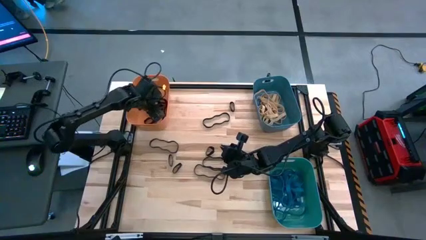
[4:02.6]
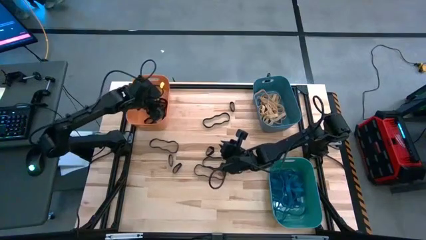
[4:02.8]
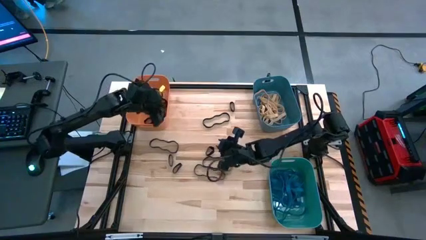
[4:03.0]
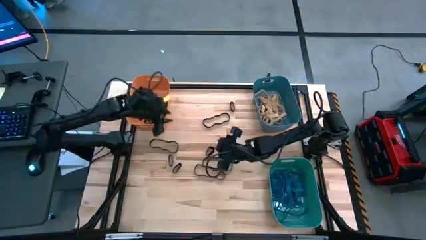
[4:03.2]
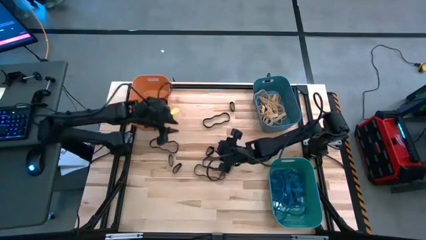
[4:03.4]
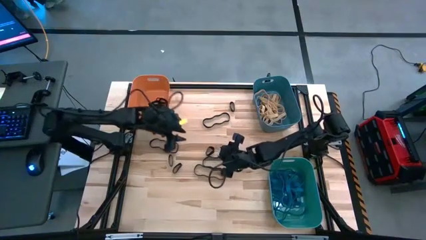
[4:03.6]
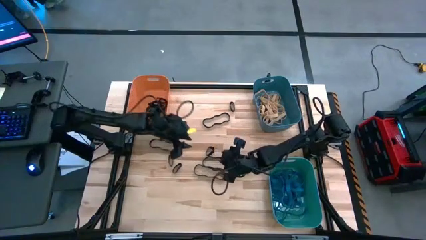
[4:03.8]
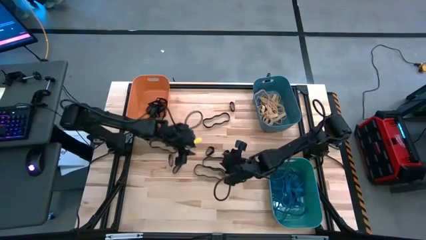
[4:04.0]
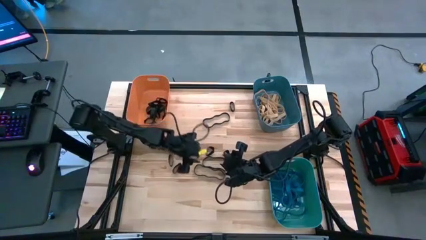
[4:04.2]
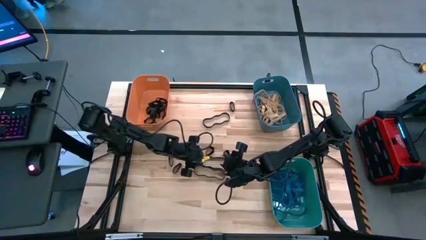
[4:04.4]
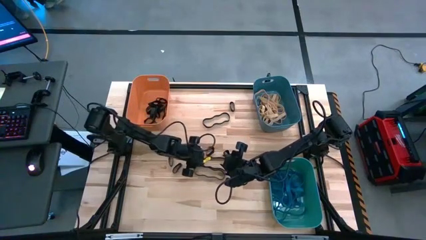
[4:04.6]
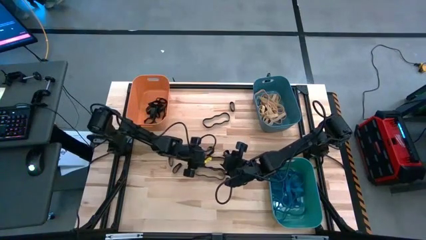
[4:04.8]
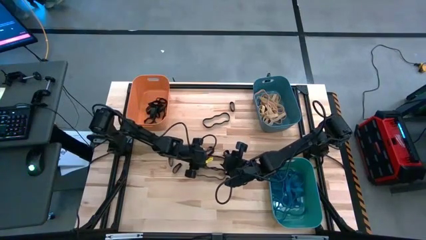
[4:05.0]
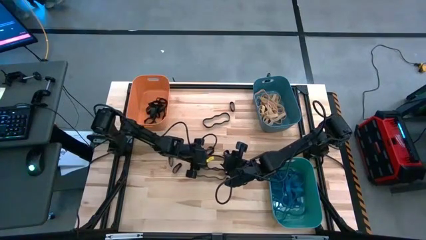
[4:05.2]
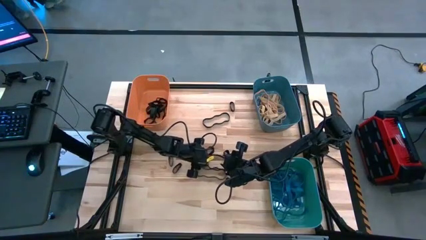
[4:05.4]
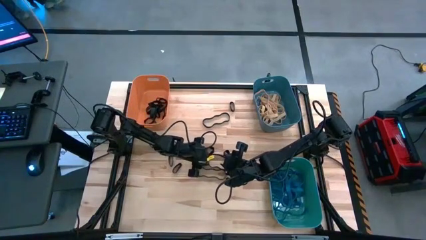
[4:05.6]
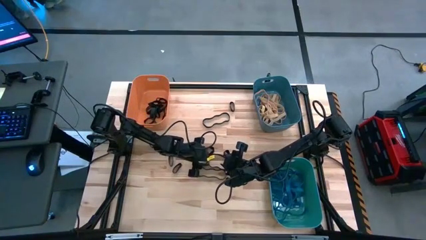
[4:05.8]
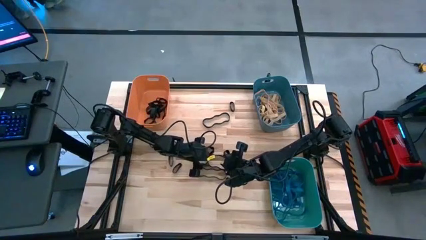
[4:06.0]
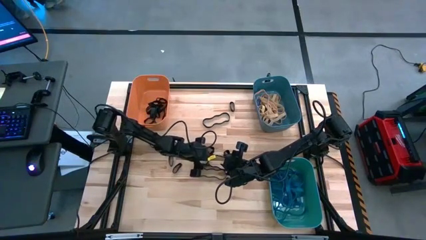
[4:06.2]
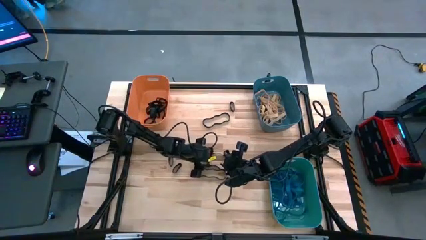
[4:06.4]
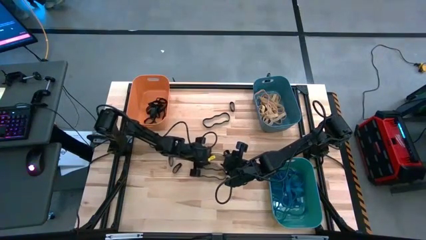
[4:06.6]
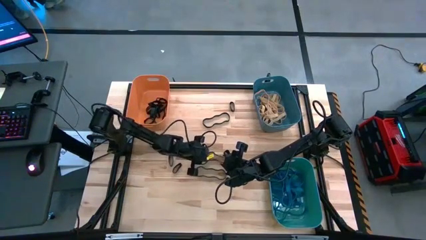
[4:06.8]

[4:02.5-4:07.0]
Task: Sort rubber bands into baskets
Put the black rubber band into the orange bin

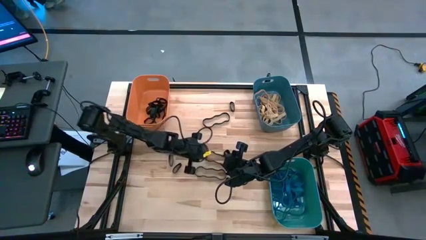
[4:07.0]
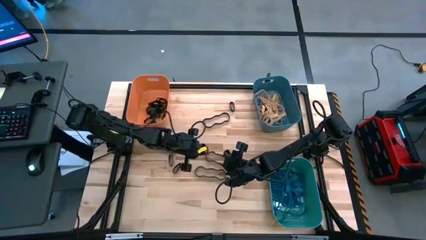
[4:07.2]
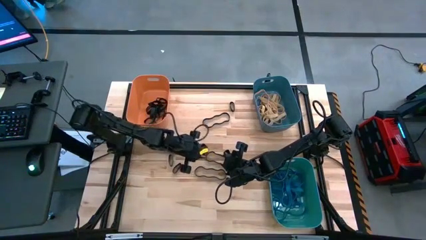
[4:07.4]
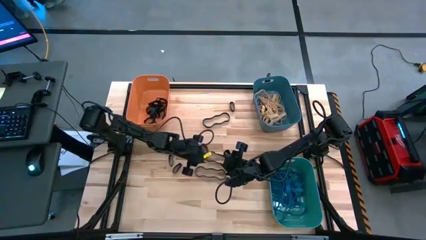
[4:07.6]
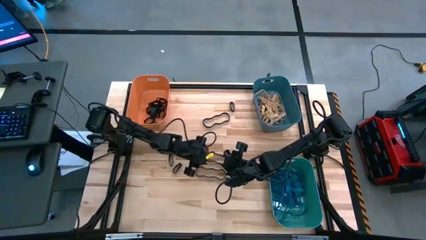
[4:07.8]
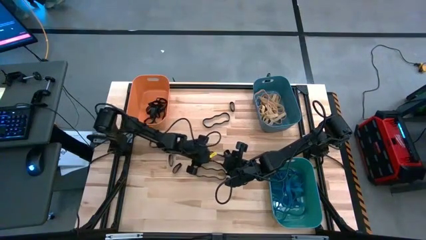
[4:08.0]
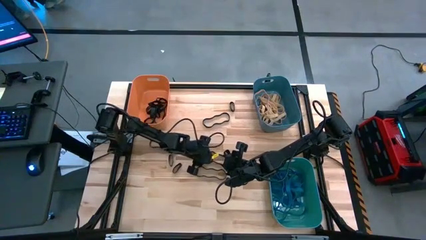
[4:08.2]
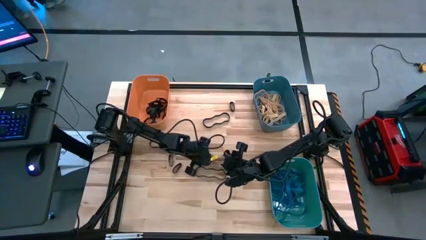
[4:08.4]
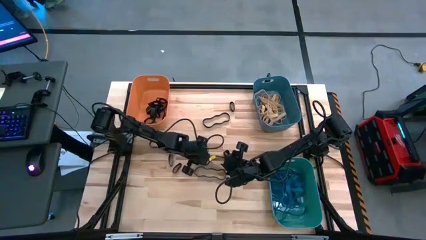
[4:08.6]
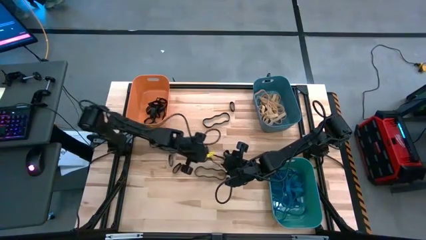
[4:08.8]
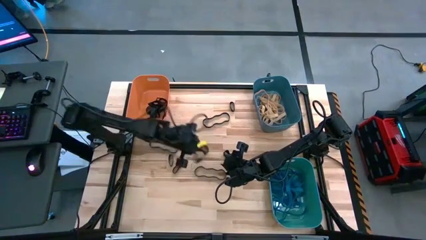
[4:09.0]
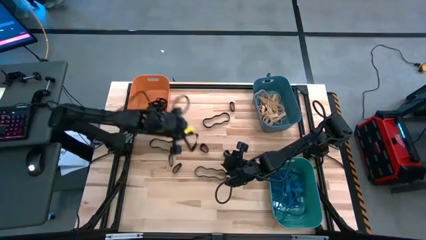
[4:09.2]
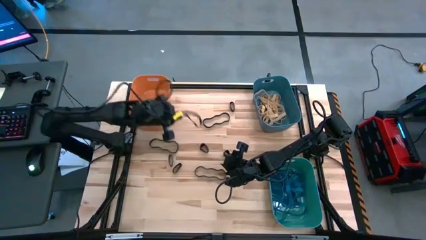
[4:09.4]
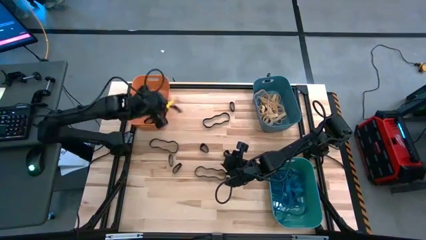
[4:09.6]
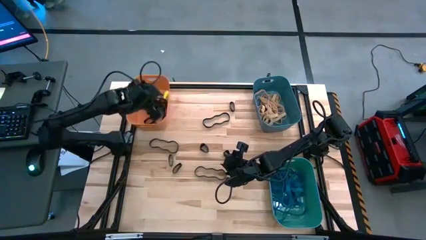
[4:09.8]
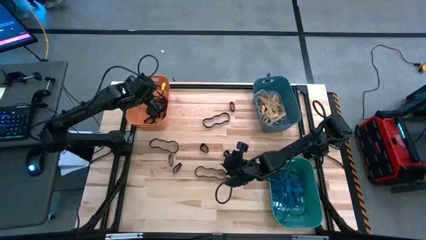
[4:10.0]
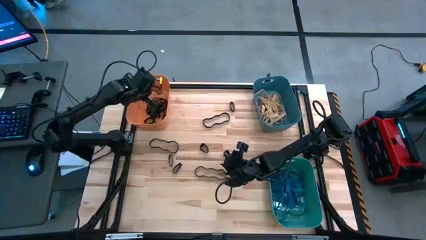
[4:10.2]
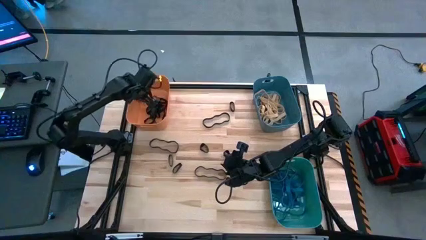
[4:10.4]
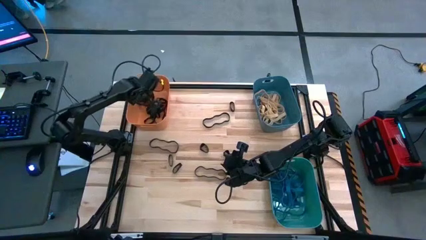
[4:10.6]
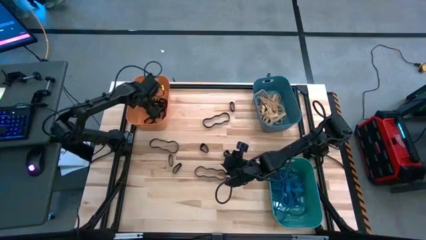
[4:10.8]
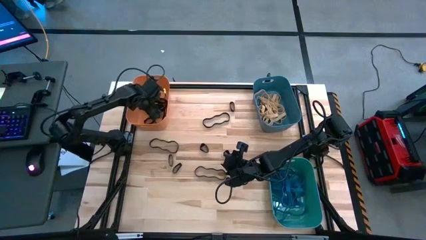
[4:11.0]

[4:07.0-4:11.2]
Put the black rubber band into the orange bin

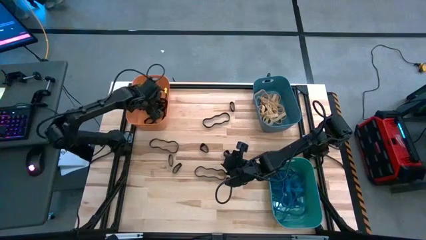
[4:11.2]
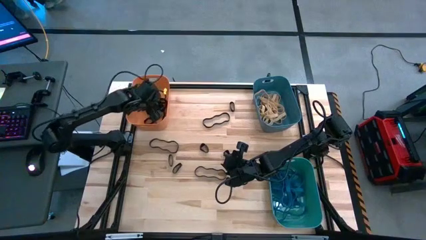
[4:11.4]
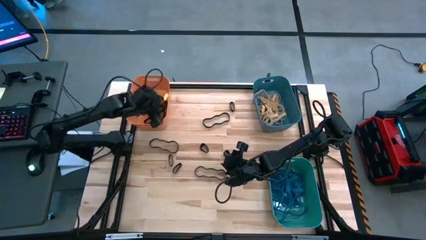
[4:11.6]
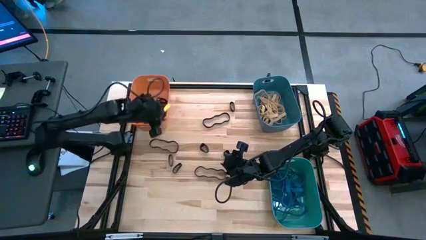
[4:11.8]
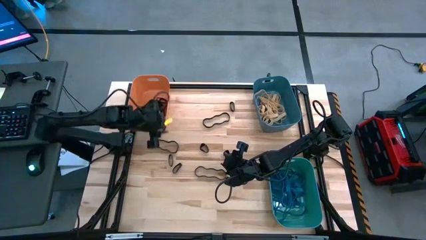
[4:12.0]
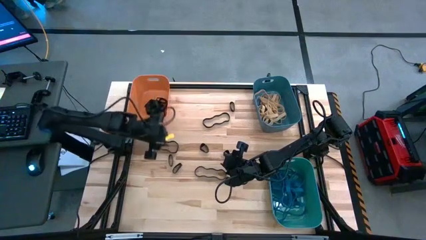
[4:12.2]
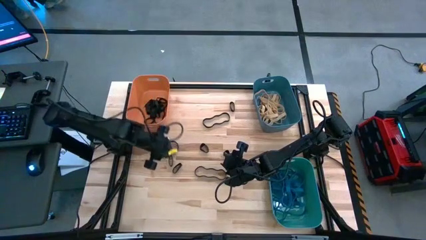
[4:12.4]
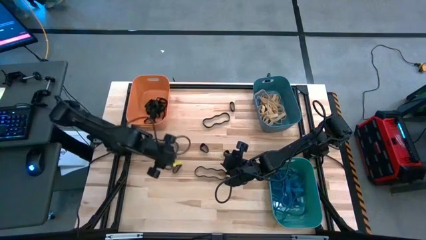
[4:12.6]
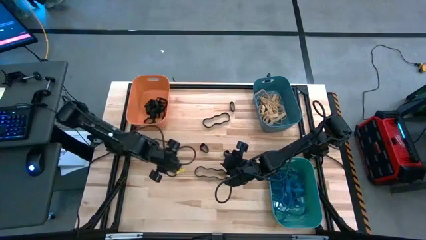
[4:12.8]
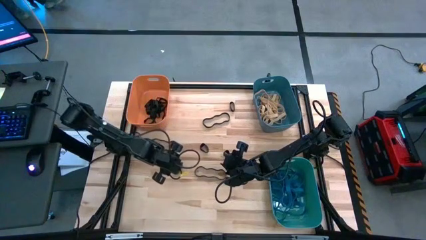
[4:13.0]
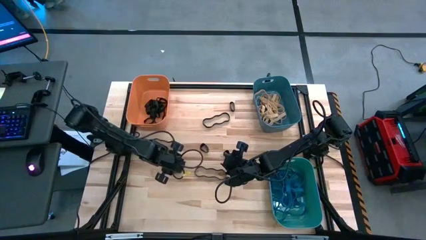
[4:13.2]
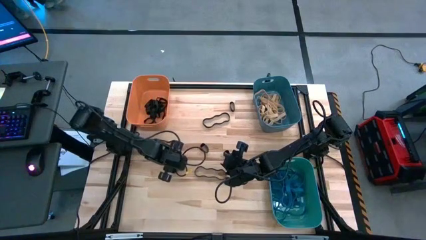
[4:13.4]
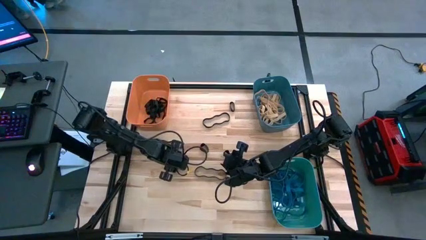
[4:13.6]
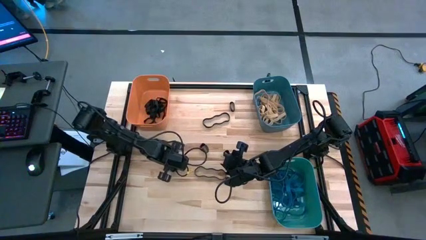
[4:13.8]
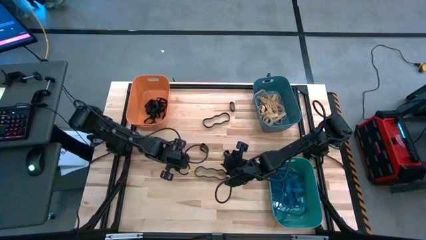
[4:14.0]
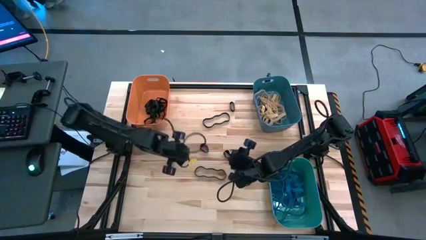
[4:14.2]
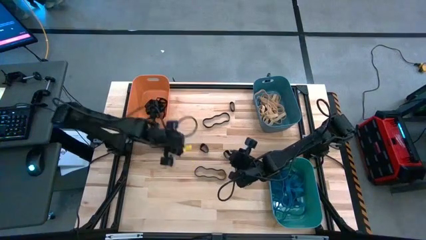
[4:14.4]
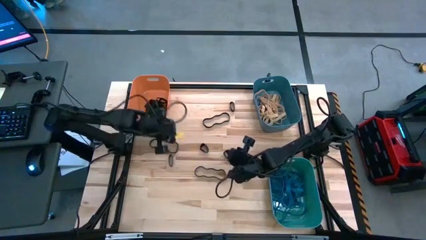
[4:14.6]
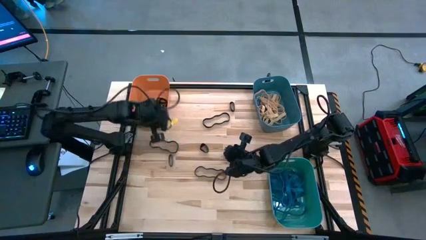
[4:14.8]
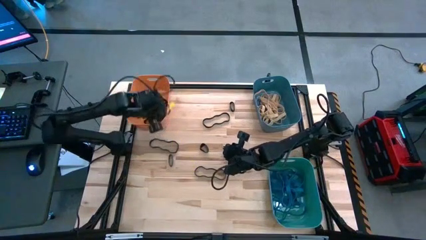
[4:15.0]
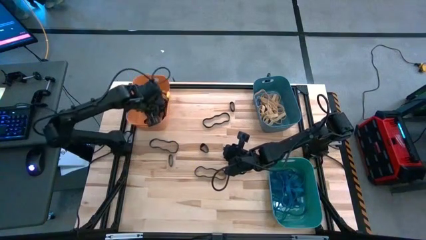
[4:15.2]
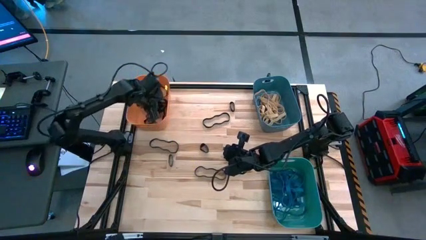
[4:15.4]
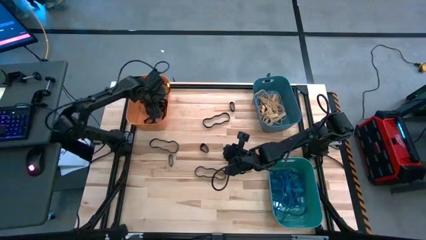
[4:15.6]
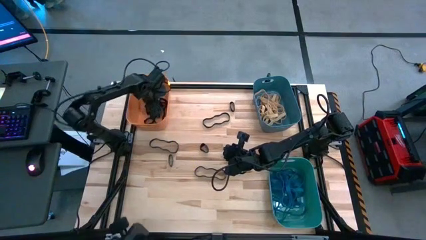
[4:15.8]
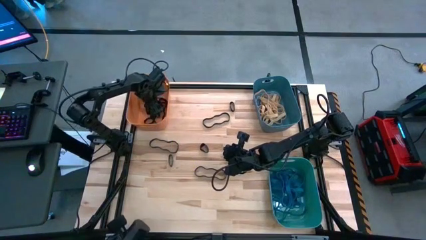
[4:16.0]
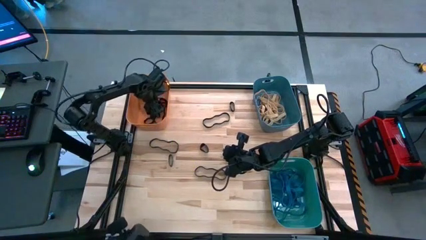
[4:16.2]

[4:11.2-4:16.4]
Put the black rubber band into the orange bin

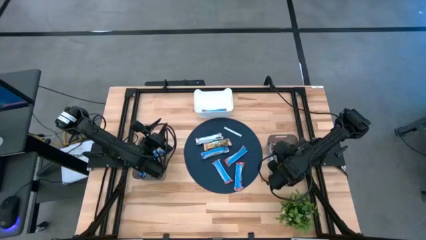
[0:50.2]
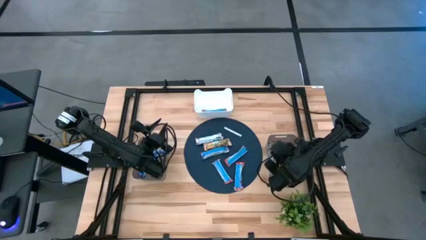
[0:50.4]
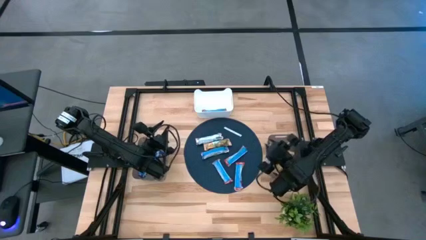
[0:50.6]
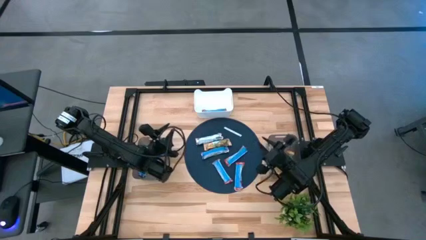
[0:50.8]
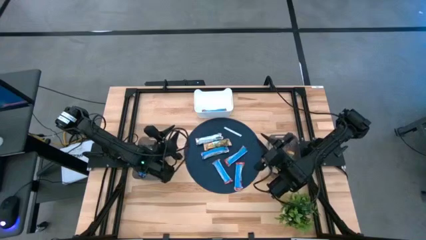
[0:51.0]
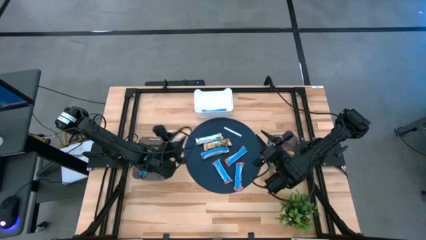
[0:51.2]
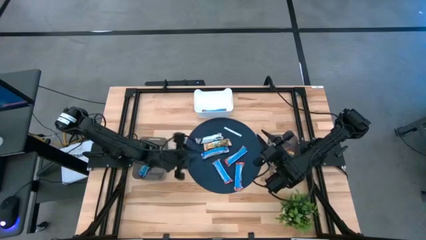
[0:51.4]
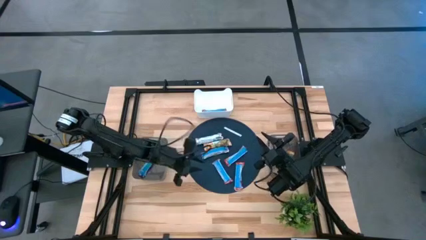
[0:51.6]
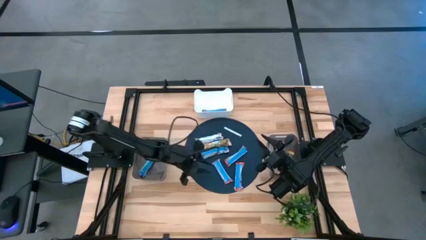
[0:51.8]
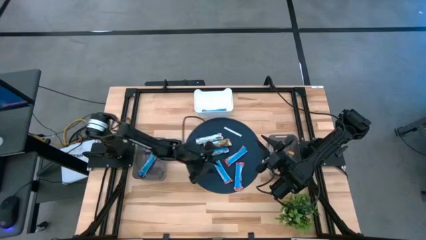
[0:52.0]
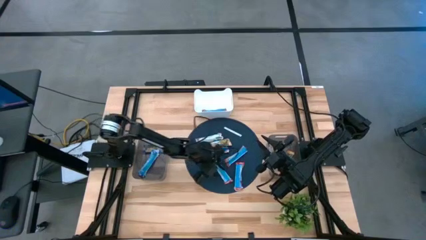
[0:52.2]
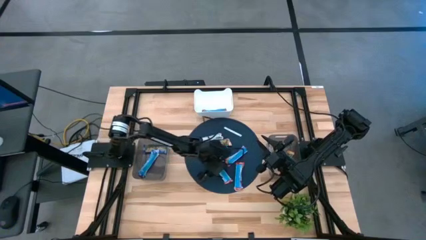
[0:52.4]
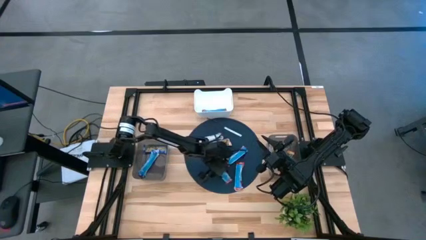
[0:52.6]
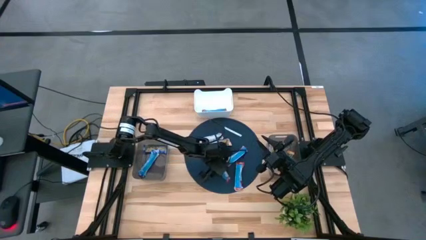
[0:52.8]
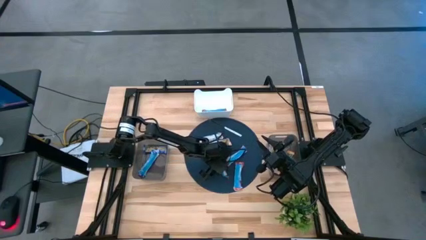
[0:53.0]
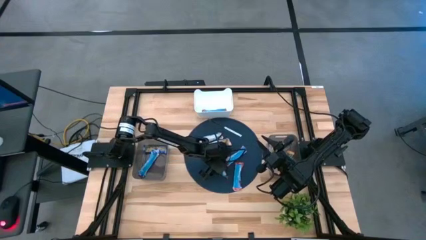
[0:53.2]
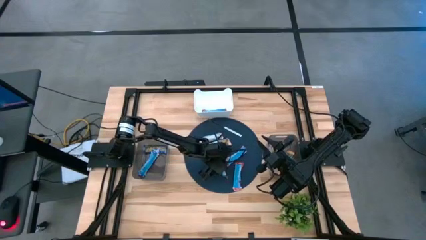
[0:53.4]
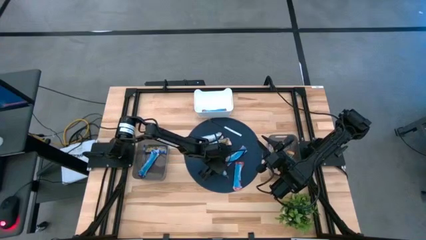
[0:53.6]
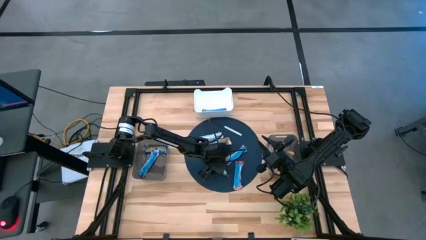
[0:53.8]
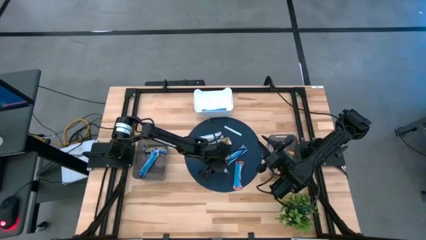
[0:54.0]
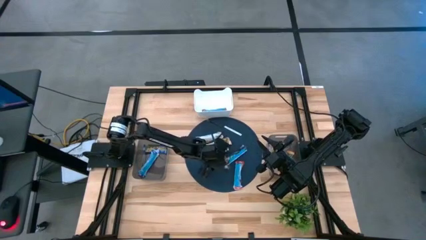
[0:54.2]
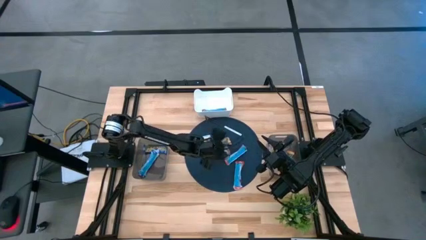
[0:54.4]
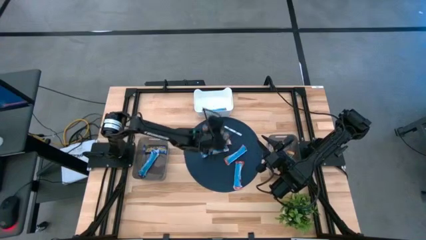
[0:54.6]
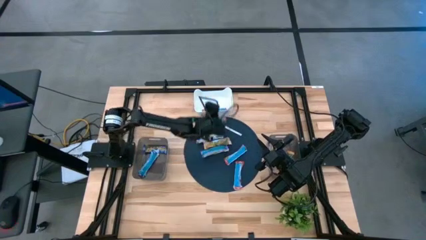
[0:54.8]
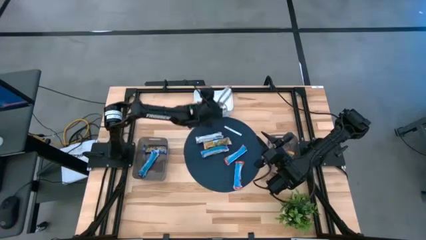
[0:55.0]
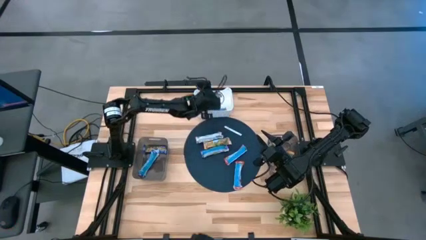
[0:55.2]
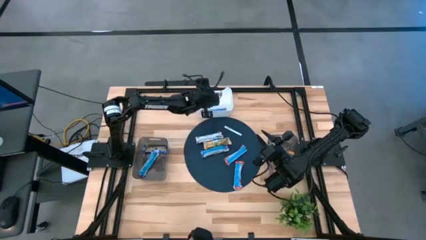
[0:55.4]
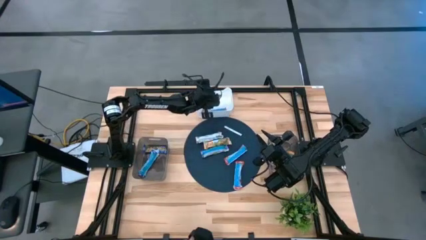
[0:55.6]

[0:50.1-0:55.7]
Task: Pick and place Granola Bars by type
Put the red granola bar into the white bin
